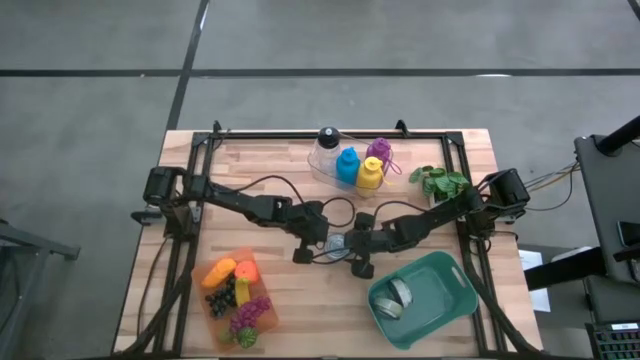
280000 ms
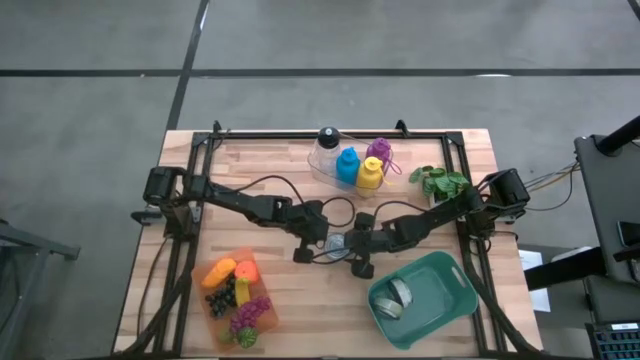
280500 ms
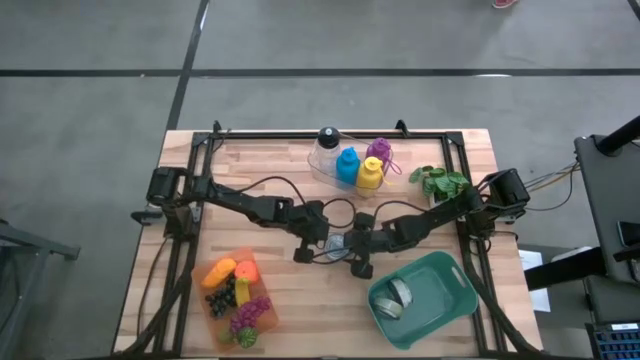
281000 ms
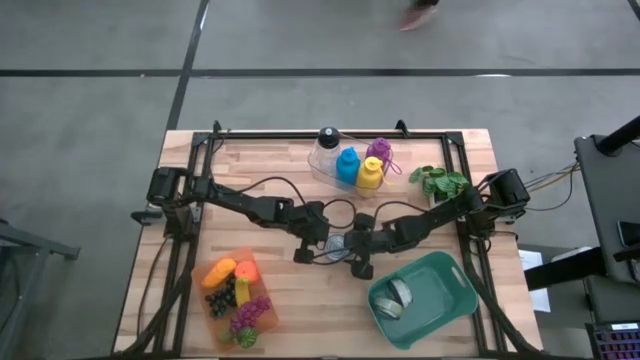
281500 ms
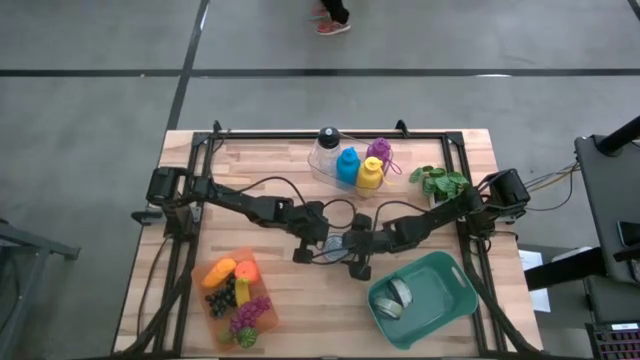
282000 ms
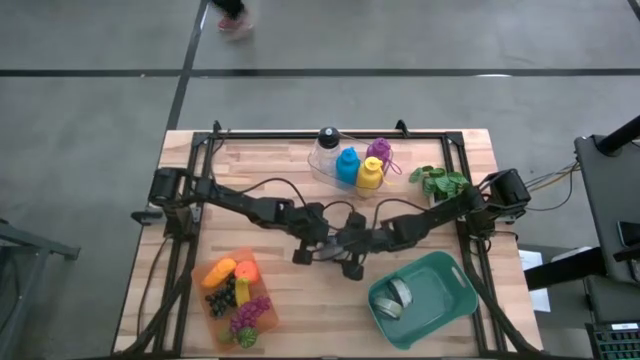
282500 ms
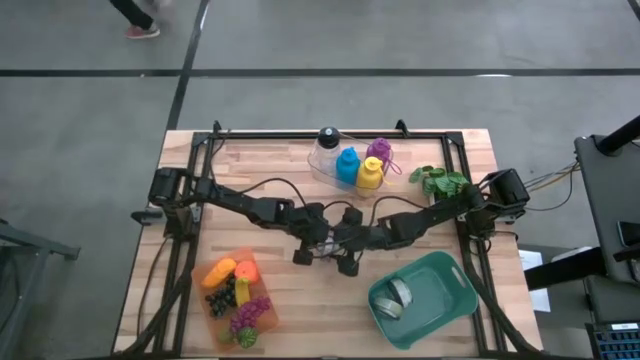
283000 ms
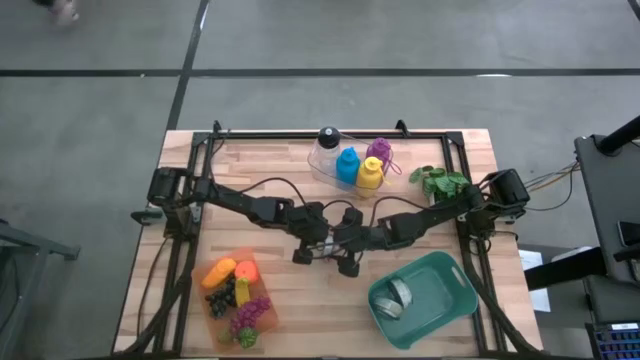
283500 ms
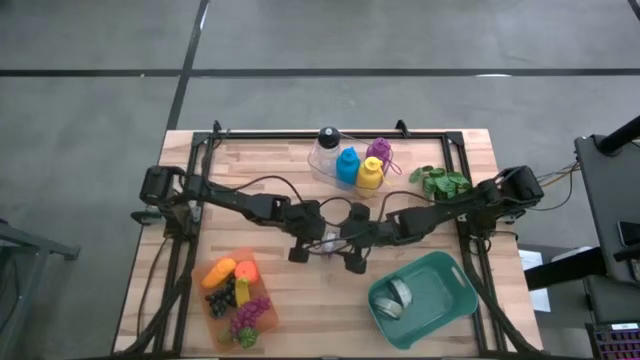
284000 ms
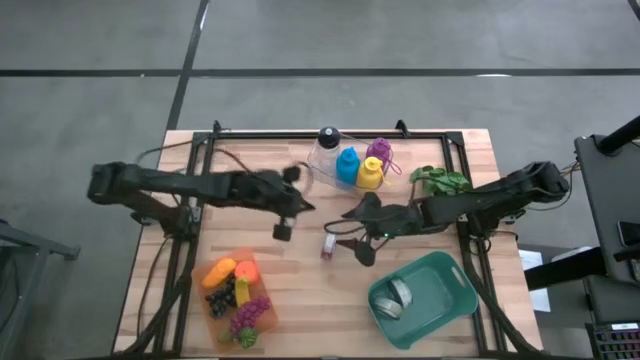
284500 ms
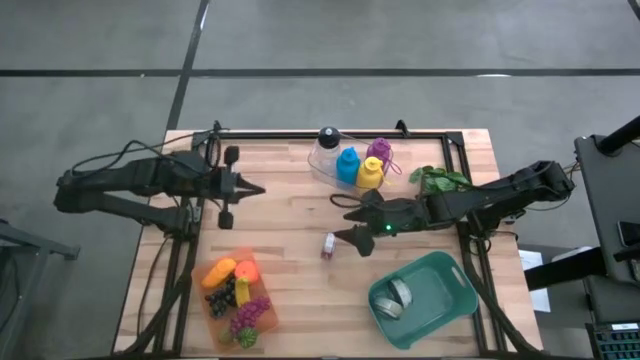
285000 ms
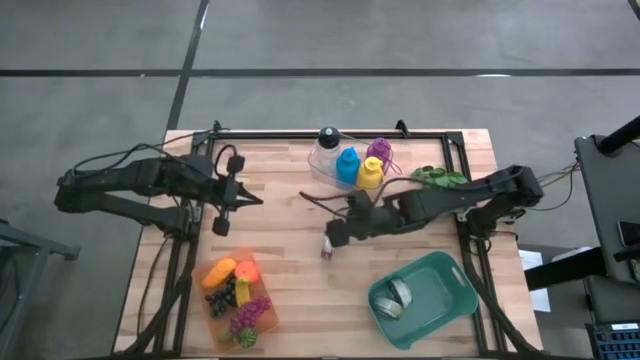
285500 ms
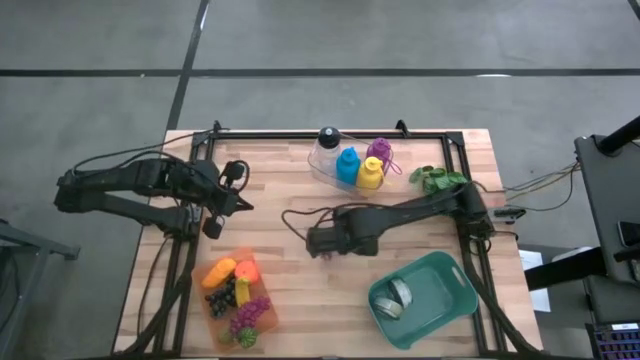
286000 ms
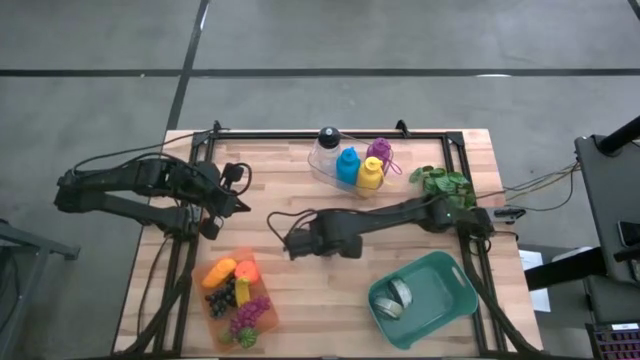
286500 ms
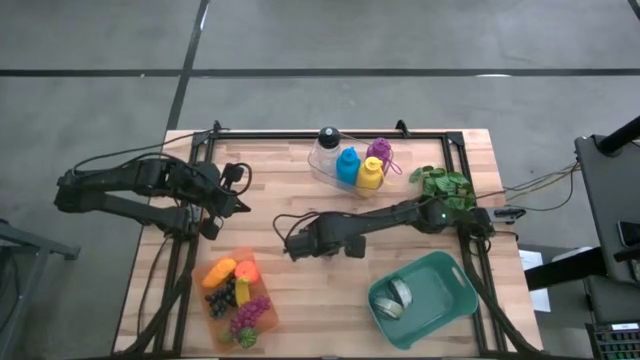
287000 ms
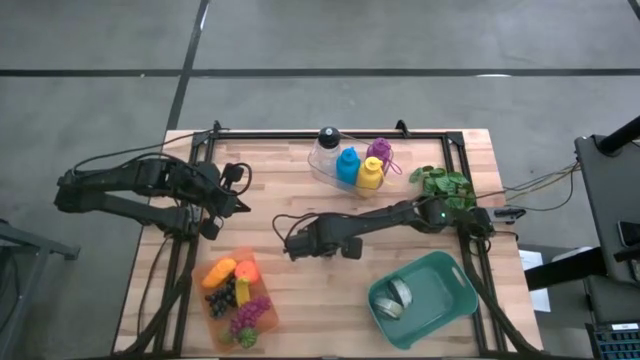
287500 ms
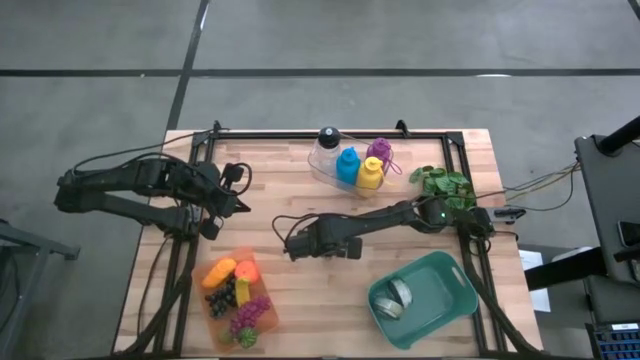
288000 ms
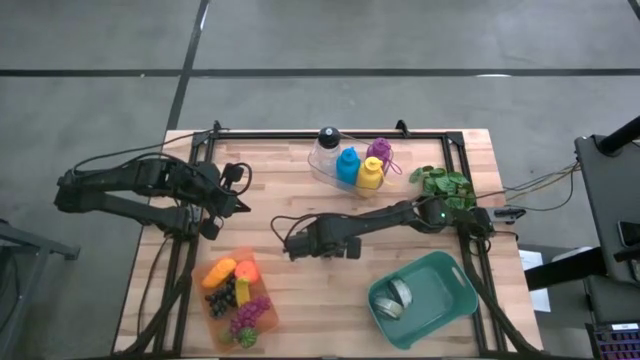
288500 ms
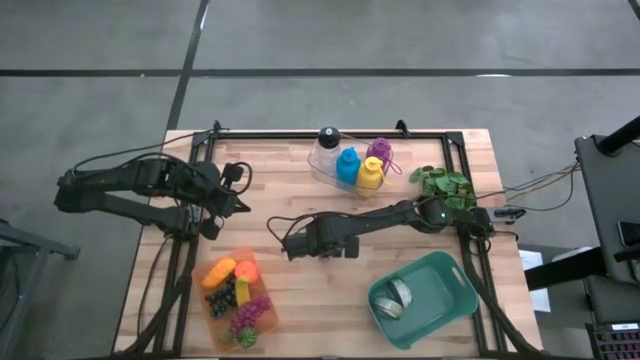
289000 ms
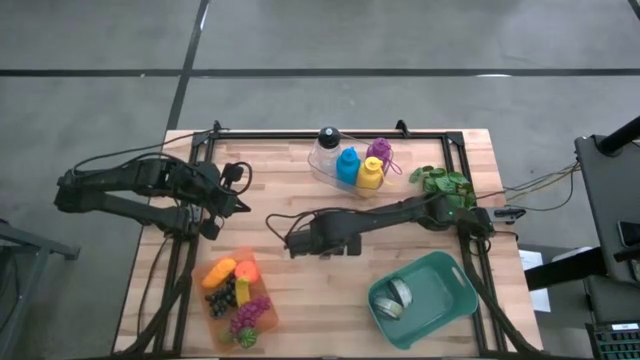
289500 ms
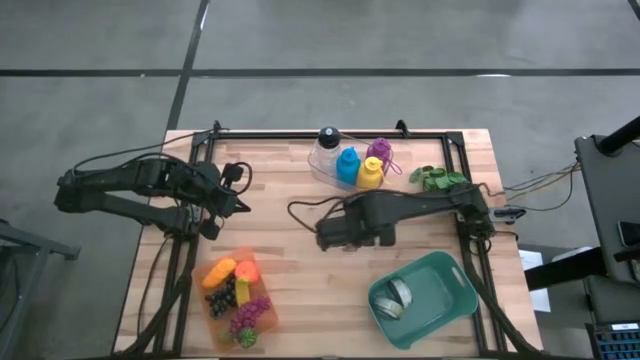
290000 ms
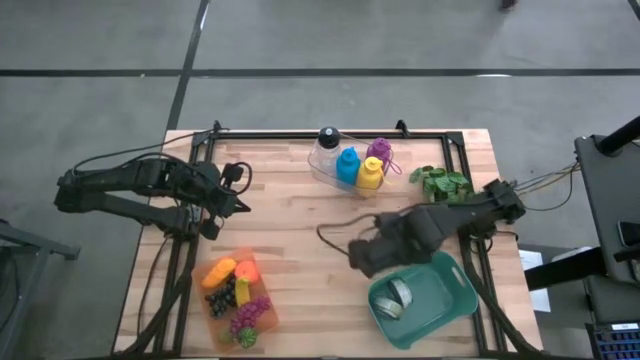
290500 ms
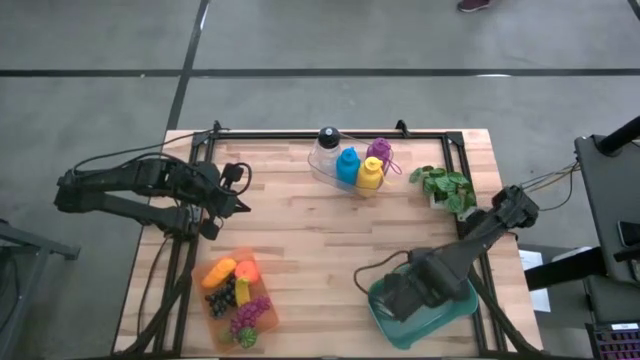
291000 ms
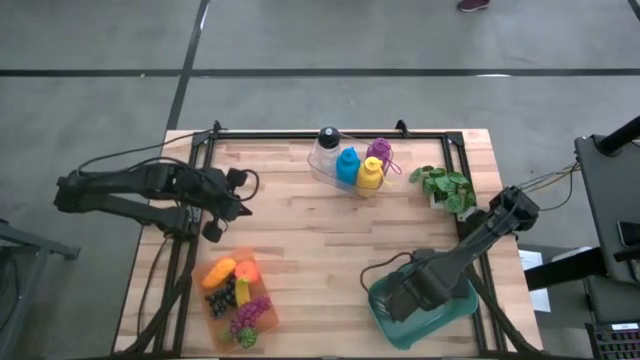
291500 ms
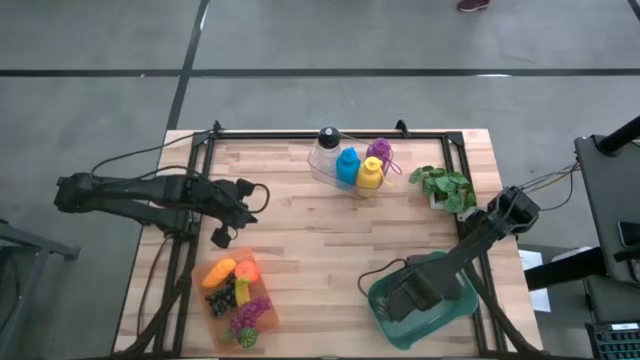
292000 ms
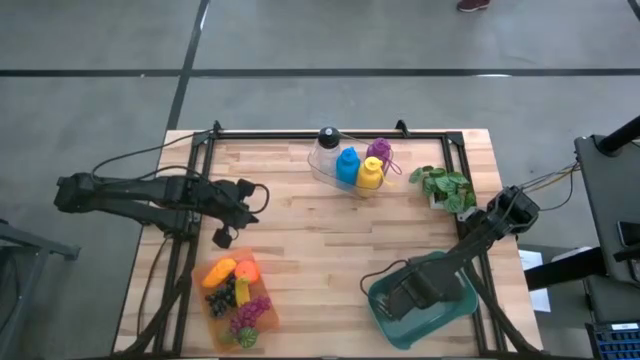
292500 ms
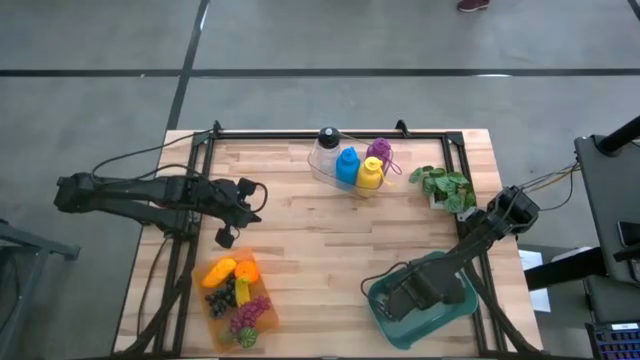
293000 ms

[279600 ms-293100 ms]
Task: Pick & Place Food Item
Put the red tuna can into the green bin

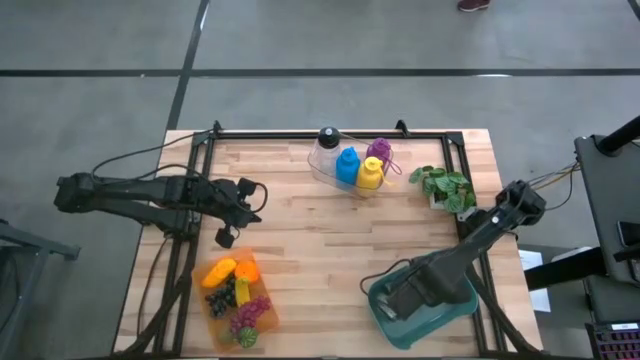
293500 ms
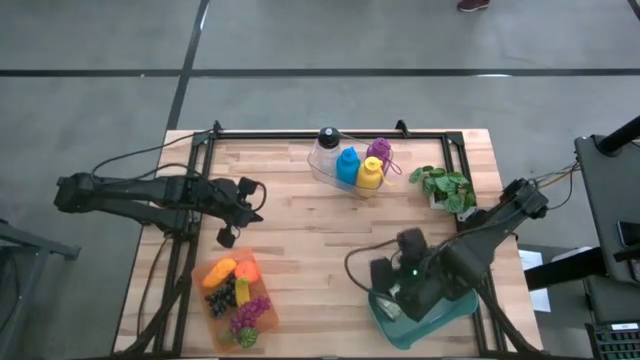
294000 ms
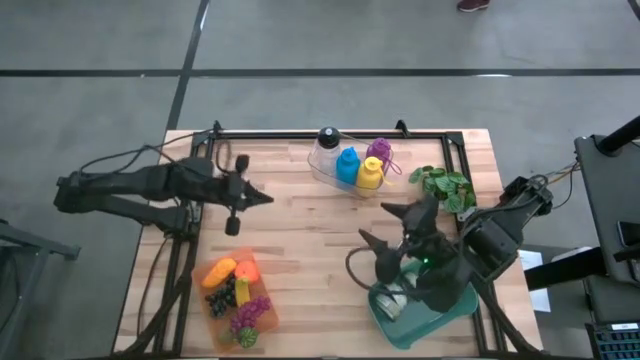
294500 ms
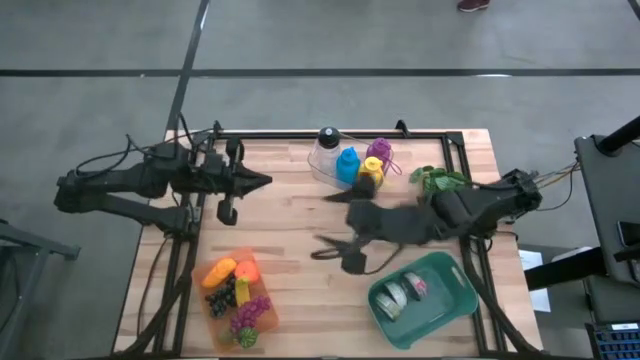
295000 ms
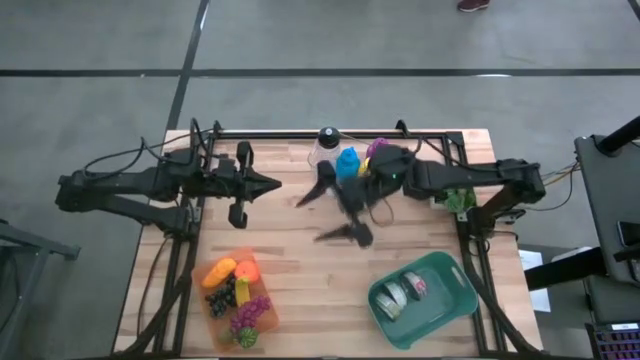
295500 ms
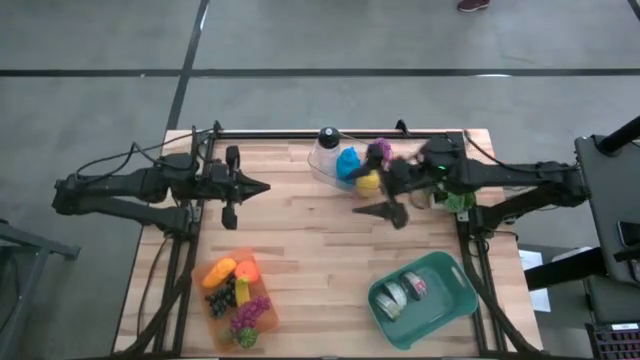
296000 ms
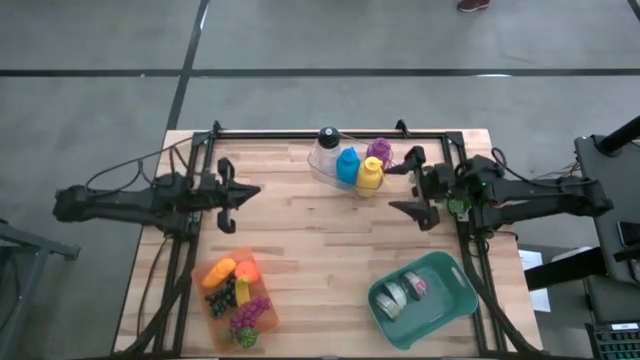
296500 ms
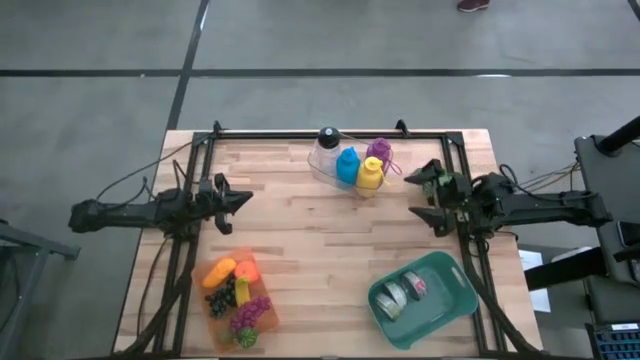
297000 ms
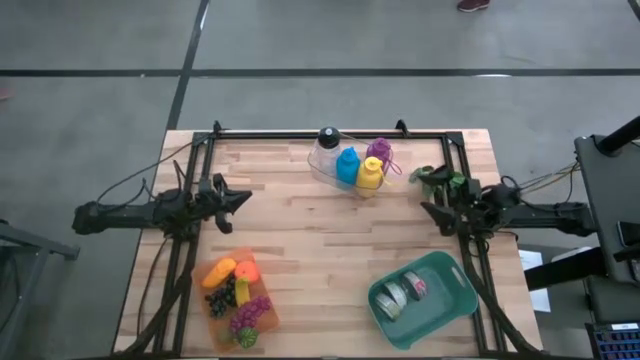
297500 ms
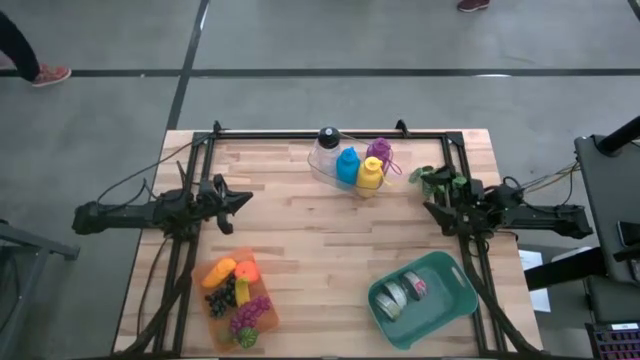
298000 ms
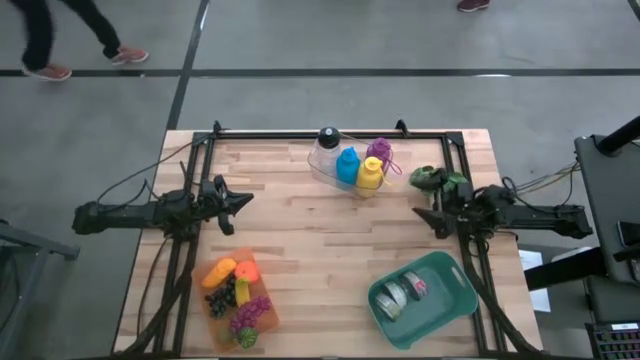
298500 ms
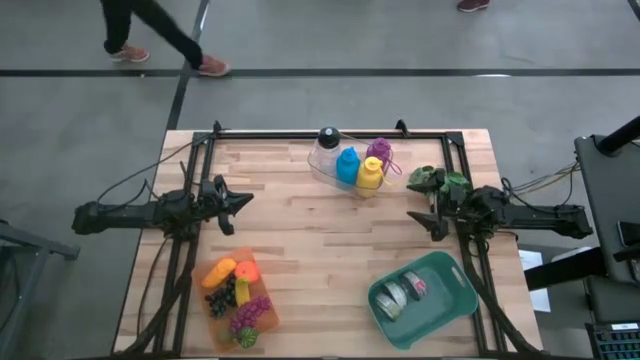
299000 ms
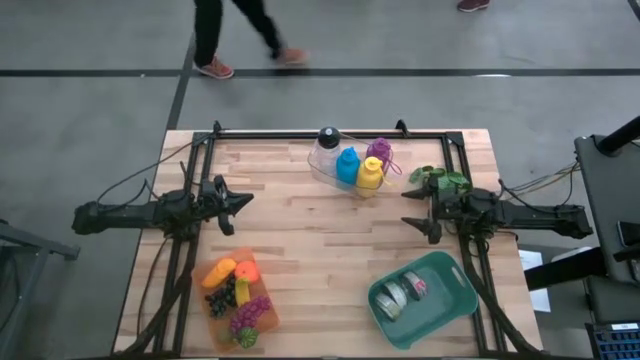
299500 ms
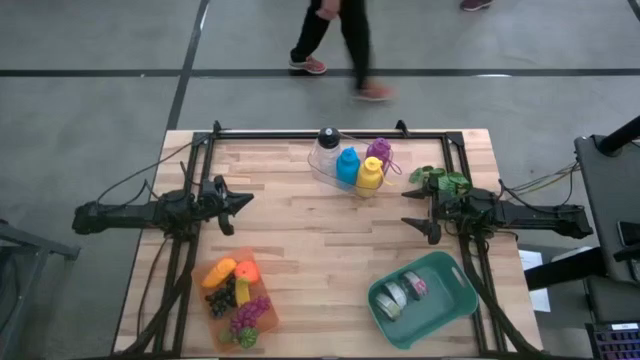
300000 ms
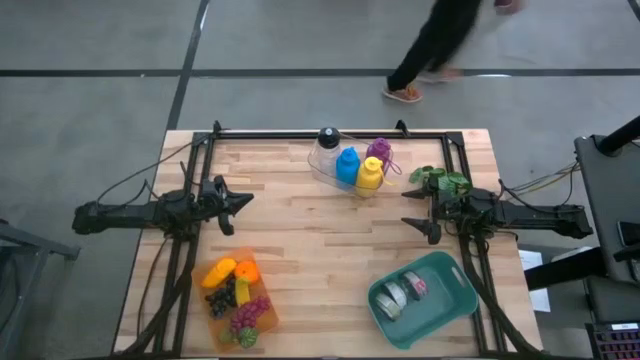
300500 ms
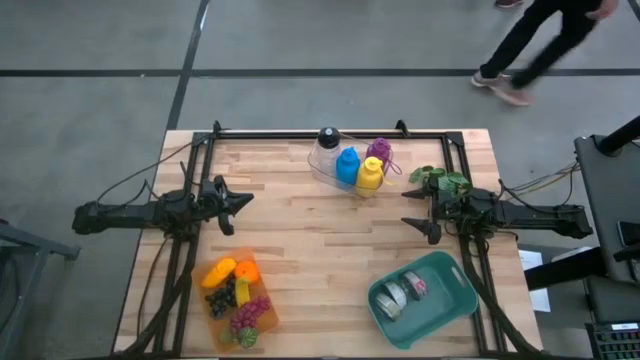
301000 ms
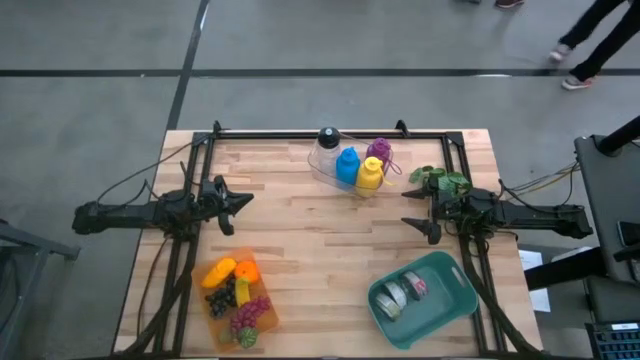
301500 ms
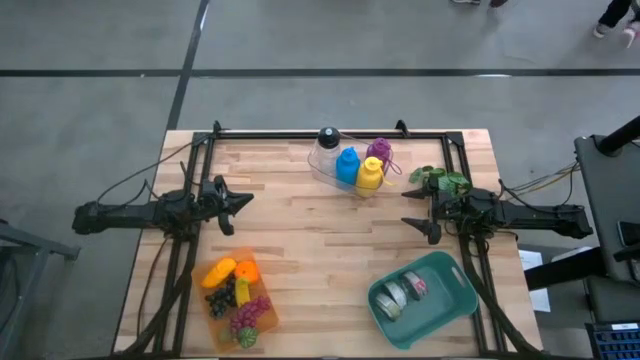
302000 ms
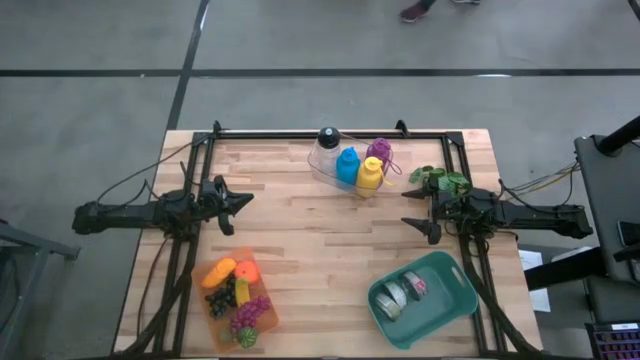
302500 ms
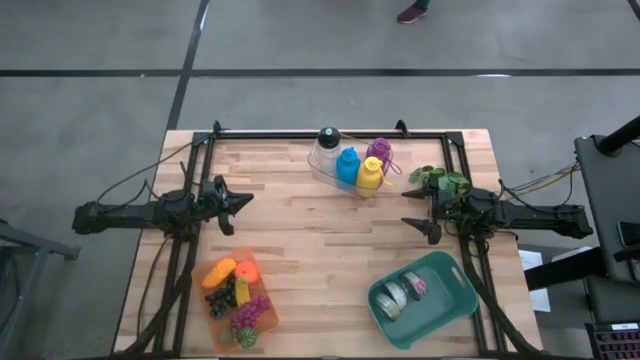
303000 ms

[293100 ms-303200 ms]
Return to Home Position
